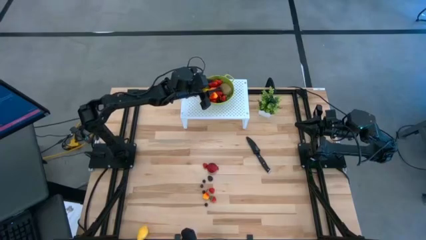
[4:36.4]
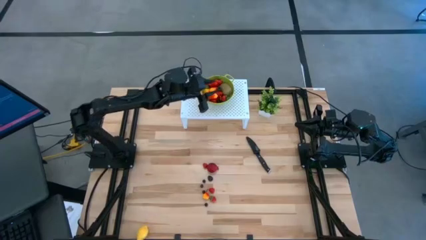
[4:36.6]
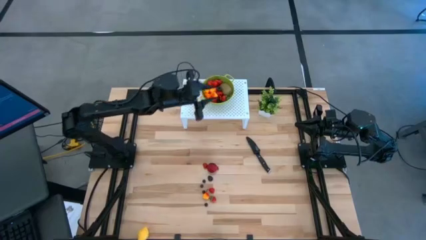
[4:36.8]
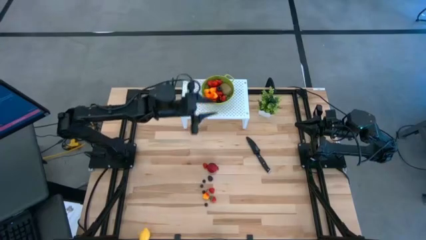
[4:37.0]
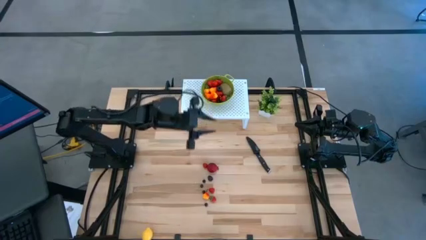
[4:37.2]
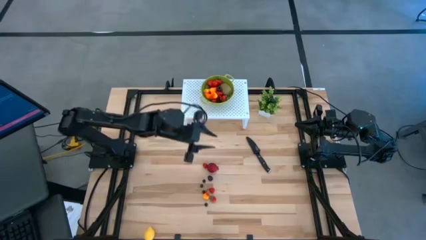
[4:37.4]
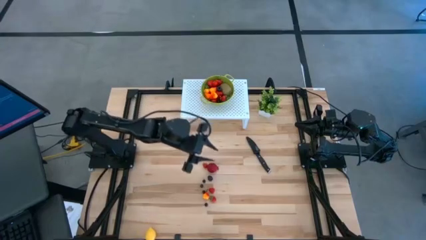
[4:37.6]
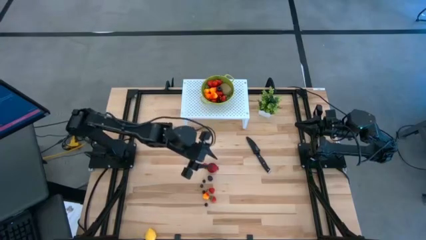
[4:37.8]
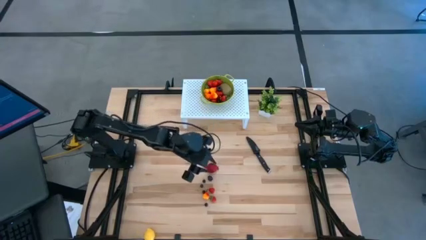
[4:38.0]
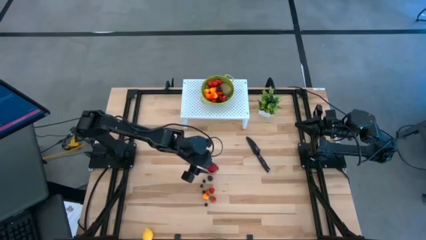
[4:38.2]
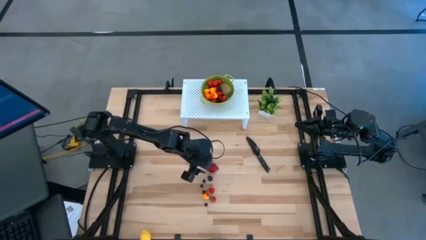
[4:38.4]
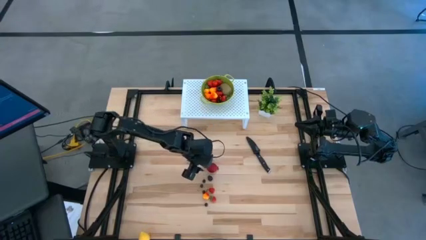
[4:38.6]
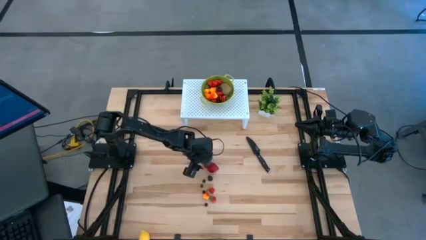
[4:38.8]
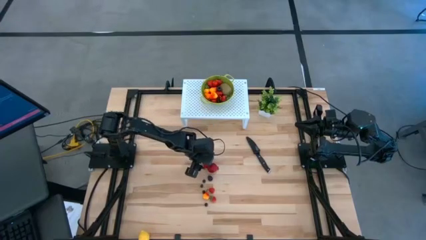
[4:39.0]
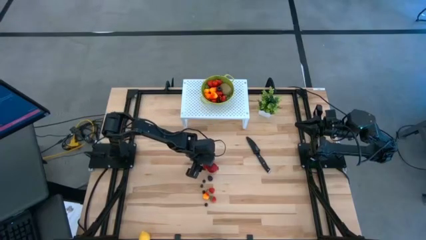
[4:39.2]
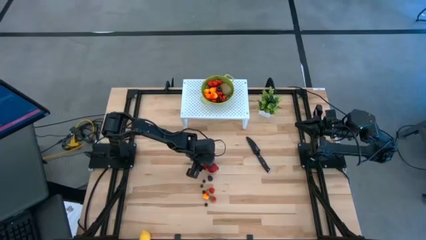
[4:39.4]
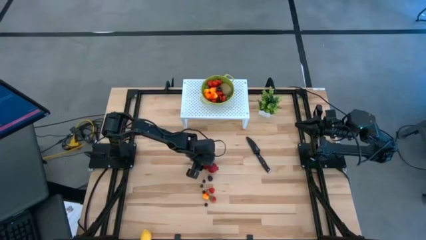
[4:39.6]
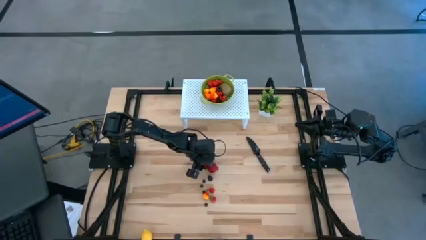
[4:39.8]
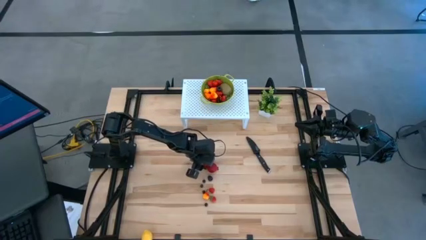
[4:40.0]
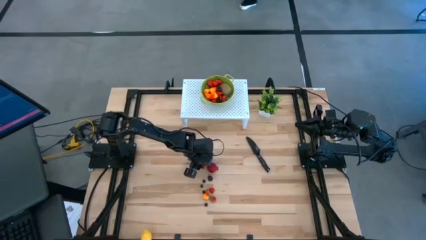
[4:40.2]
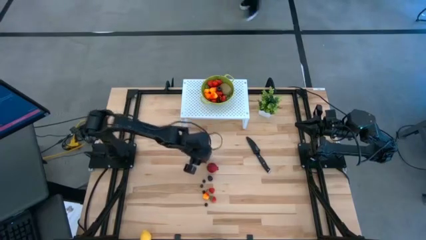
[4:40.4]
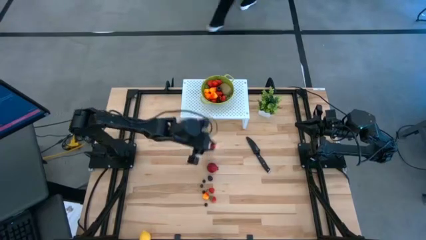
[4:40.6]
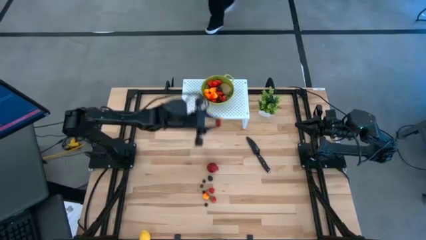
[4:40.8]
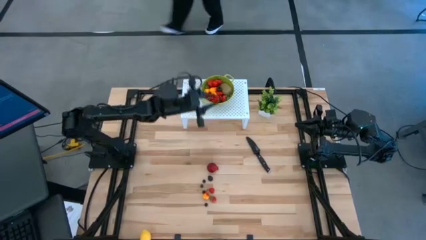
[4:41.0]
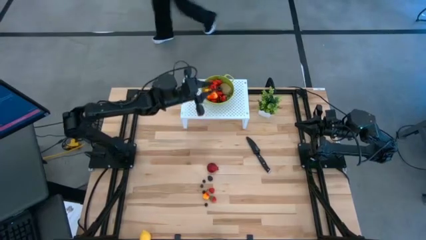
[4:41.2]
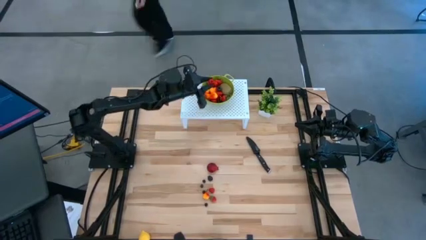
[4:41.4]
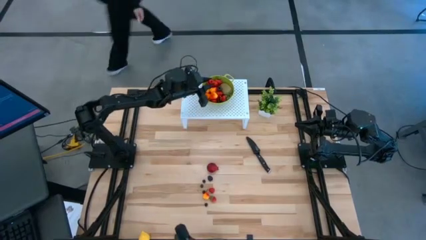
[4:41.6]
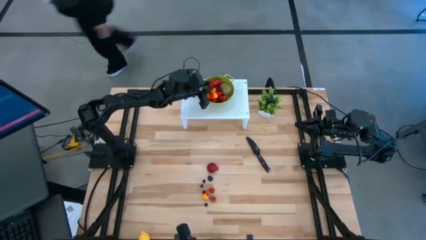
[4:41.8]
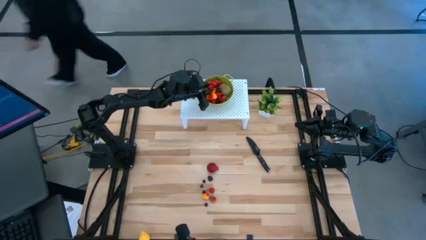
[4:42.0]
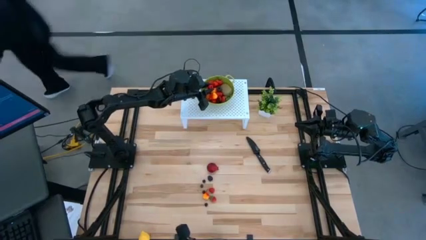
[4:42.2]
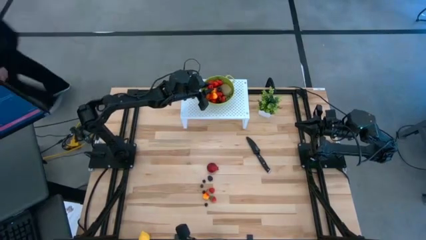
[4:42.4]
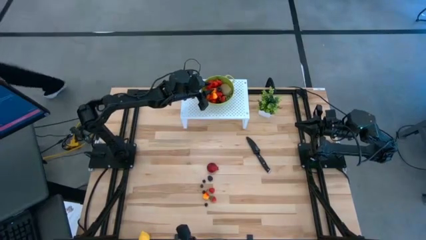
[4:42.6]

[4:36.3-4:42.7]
Task: Pick & Place Fruit
Put the red raspberry into the green strainer bowl

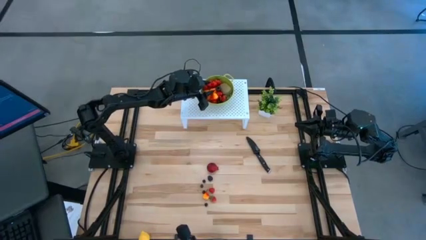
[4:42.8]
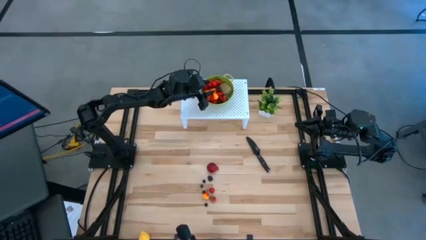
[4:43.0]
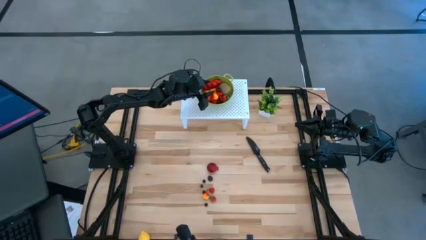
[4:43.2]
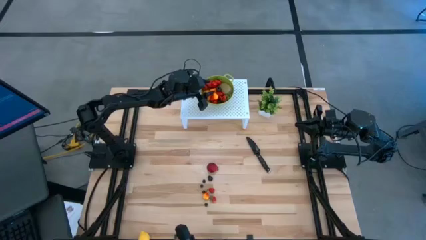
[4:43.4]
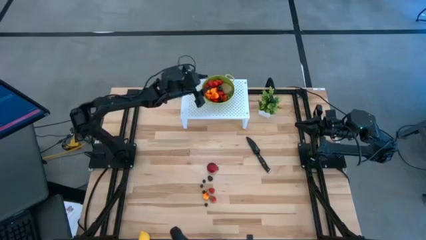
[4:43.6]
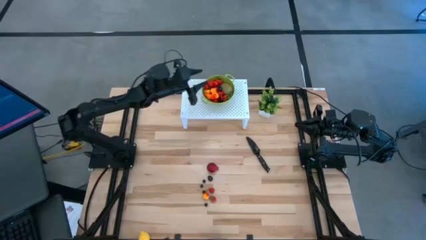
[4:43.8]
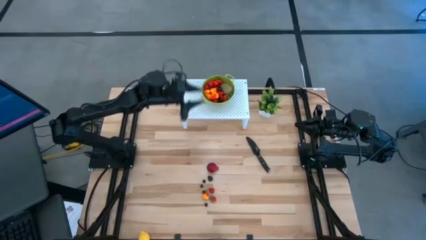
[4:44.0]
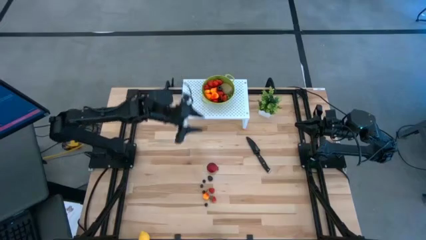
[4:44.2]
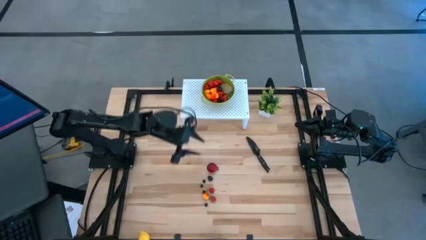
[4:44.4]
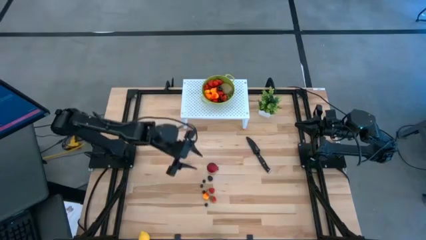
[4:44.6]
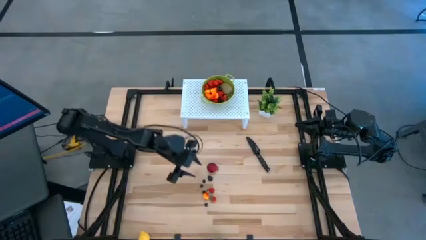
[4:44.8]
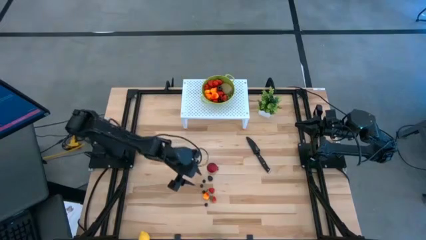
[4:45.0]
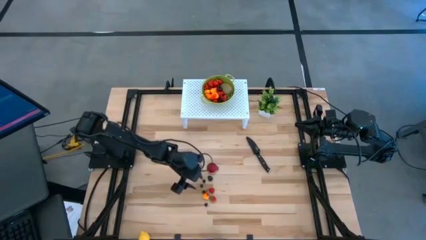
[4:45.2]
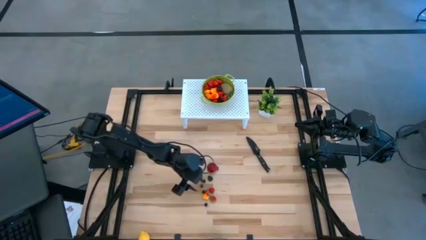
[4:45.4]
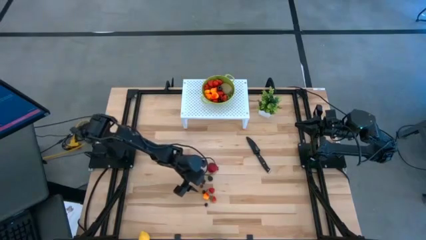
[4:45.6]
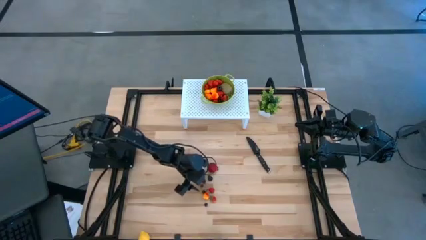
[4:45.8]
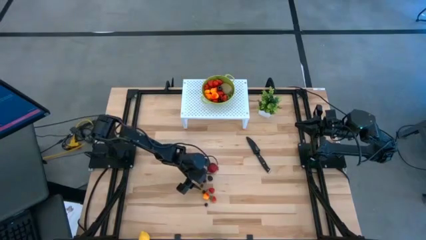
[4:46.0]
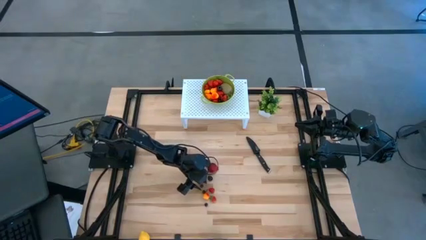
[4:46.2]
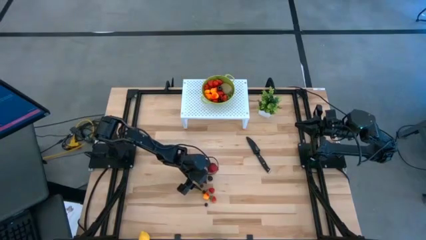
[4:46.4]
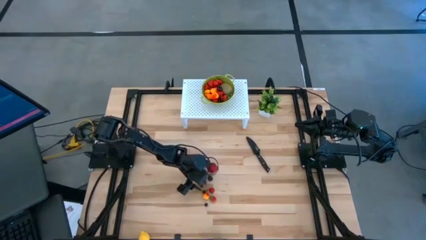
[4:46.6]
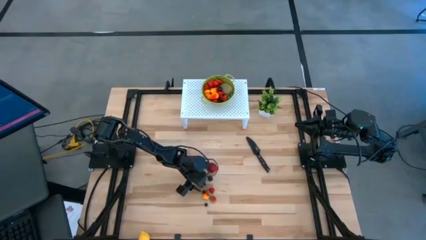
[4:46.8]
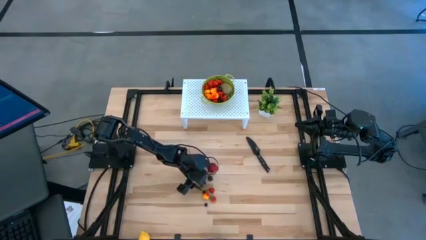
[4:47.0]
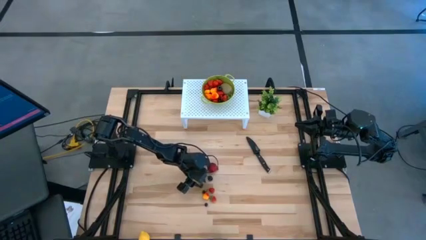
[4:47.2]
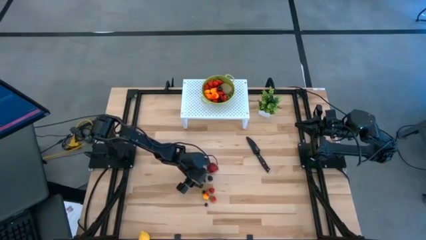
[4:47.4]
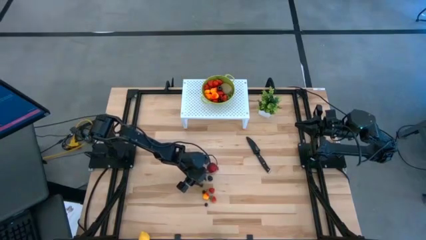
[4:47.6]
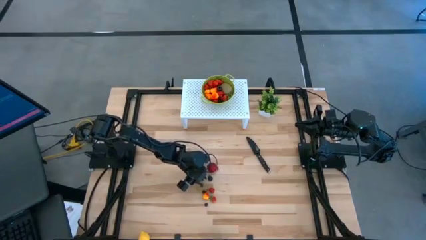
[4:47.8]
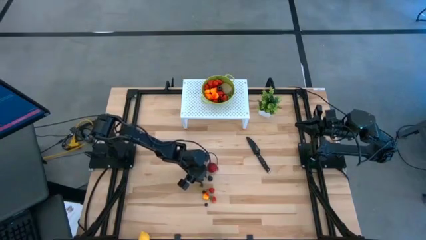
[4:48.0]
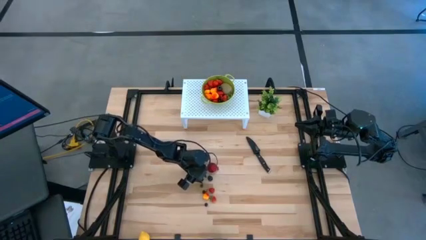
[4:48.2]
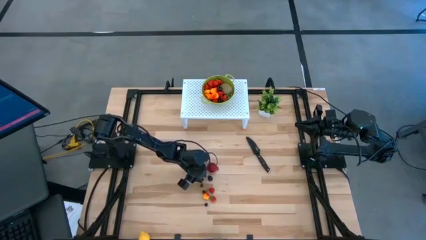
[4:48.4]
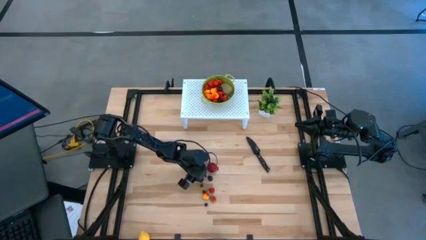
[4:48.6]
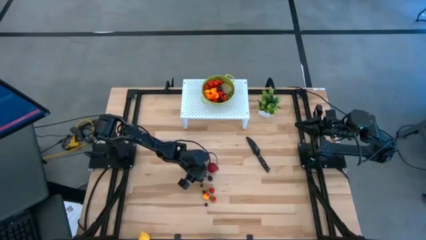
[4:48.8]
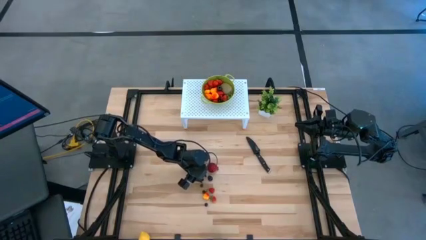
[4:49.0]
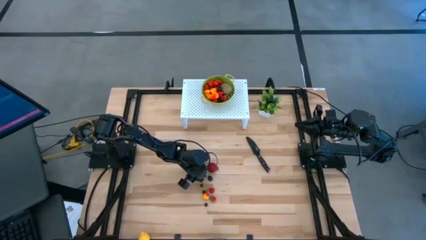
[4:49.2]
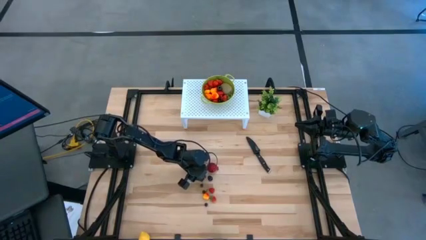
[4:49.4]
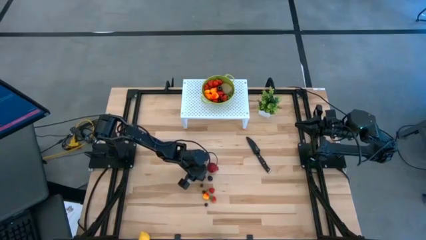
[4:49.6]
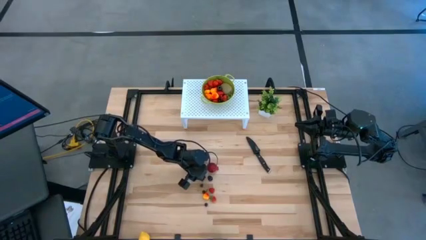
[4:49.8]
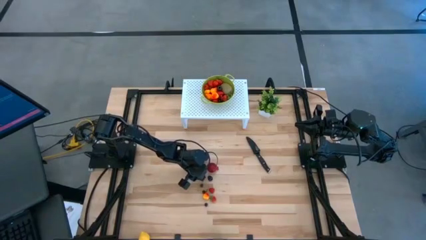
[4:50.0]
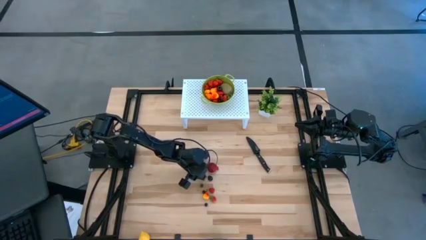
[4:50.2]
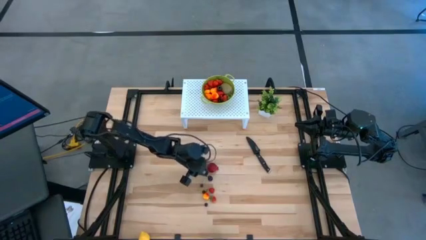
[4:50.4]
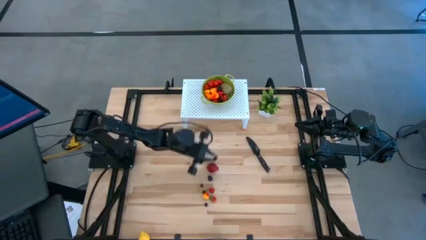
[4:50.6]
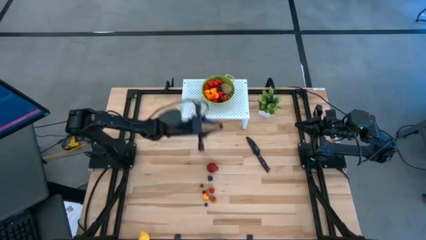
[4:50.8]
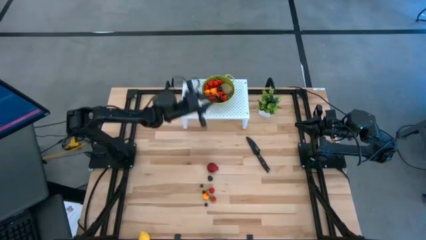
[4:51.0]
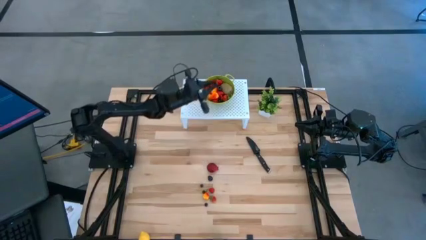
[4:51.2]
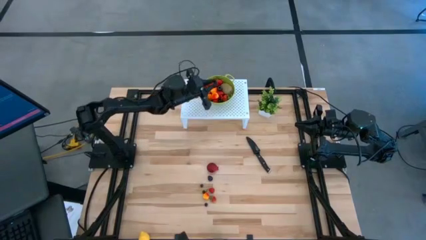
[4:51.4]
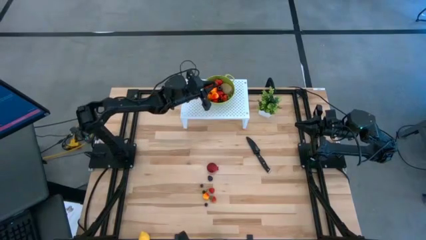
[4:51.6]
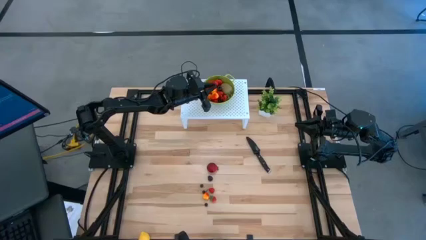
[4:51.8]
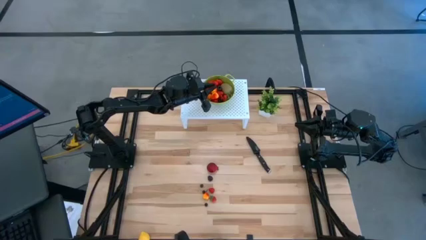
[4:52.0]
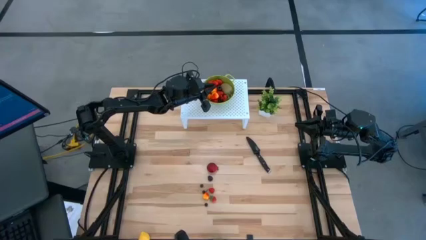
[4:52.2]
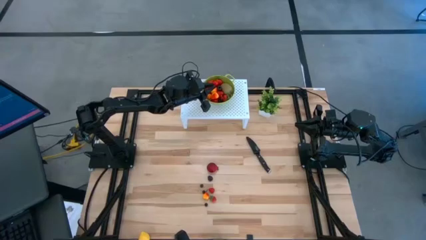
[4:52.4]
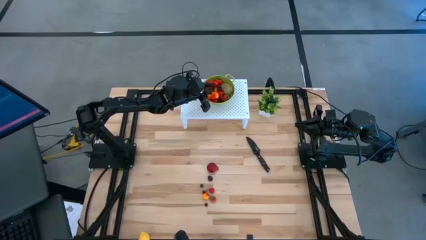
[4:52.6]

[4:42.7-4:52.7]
Put the black blueberry into the green strainer bowl
